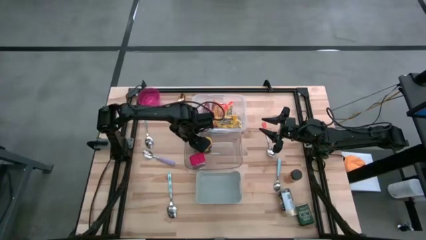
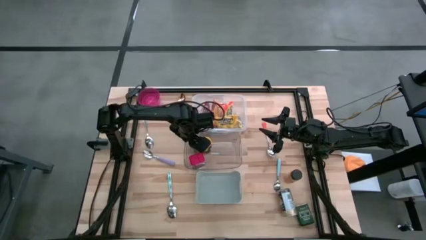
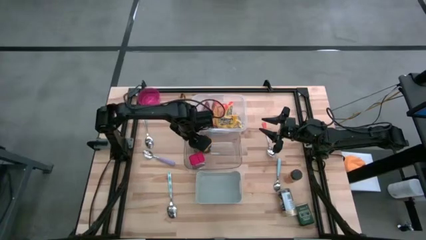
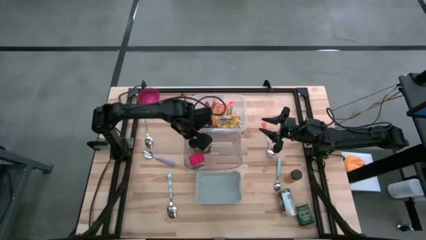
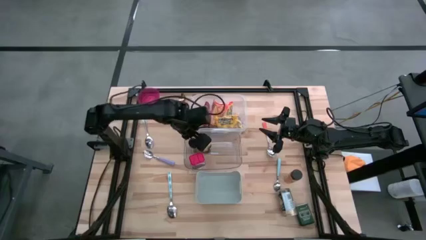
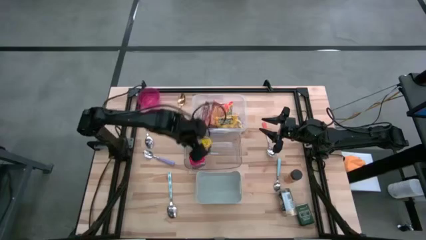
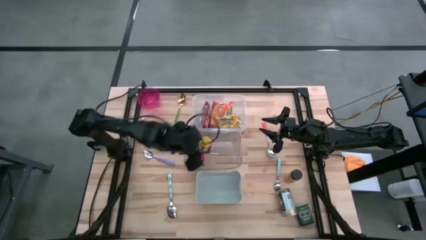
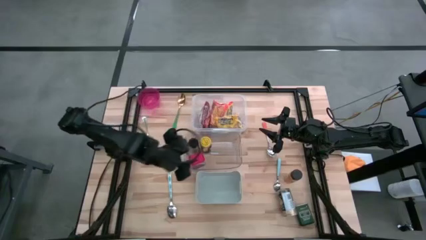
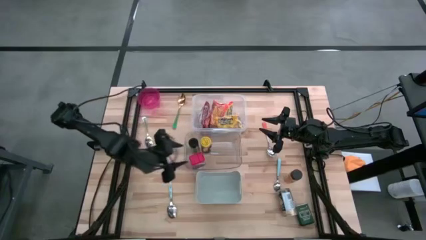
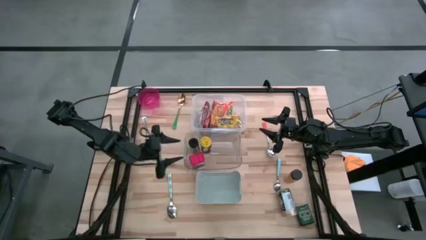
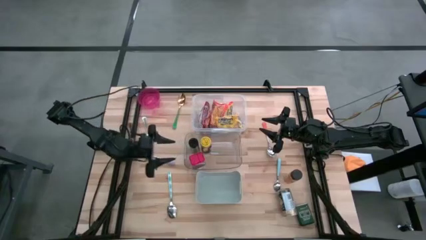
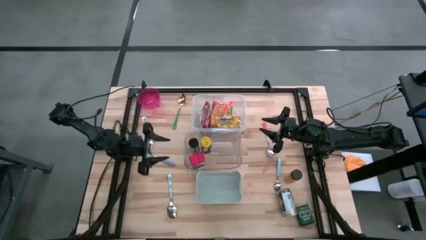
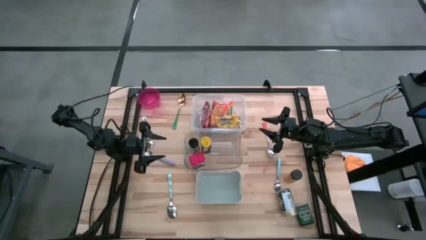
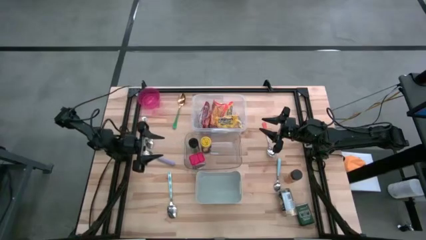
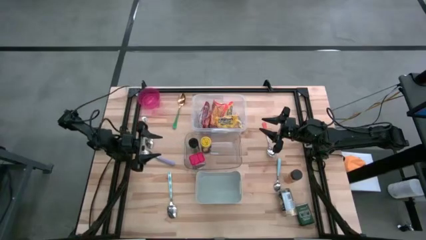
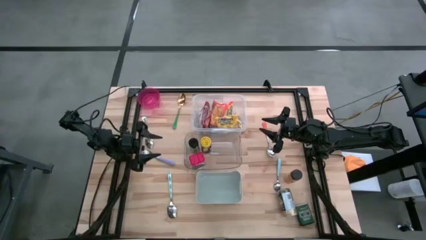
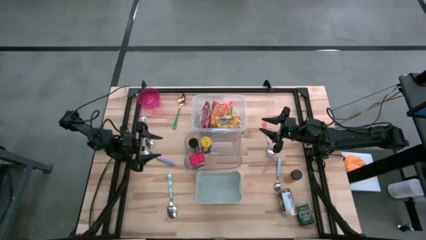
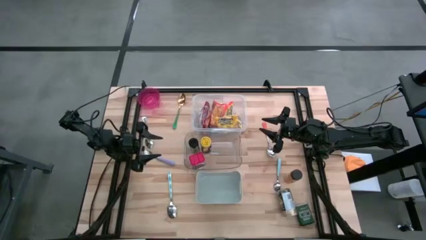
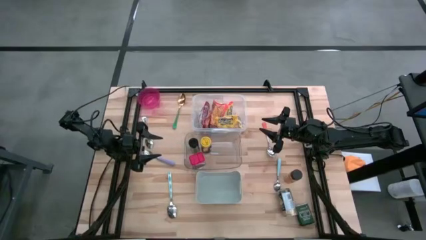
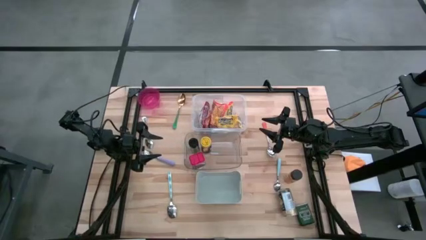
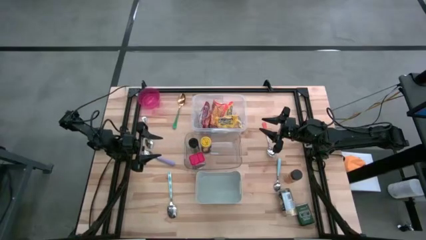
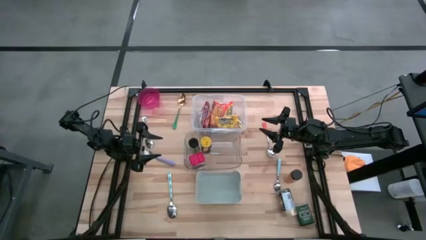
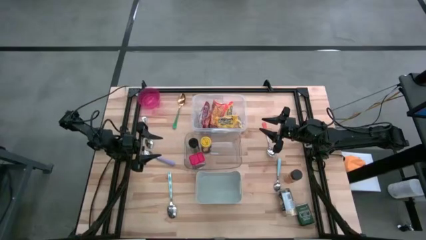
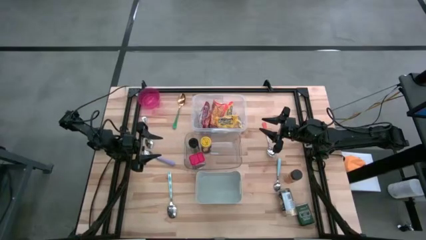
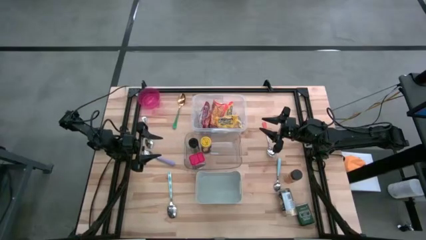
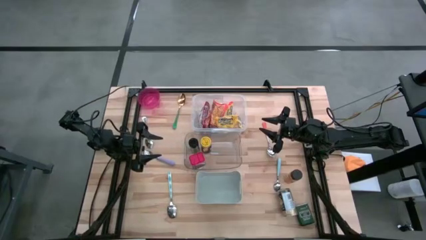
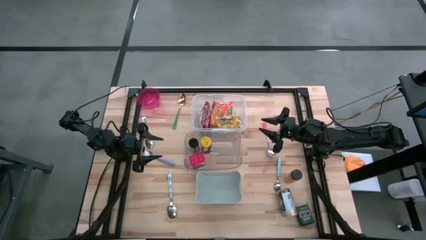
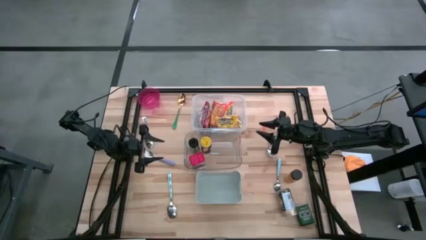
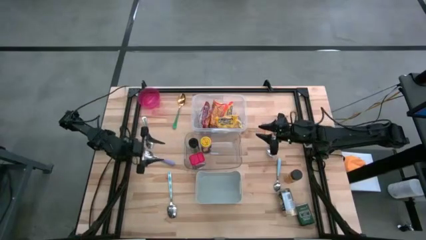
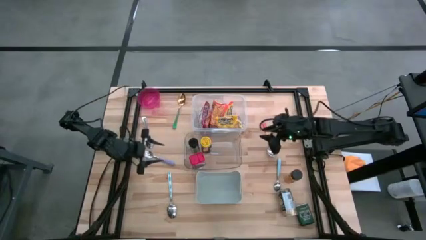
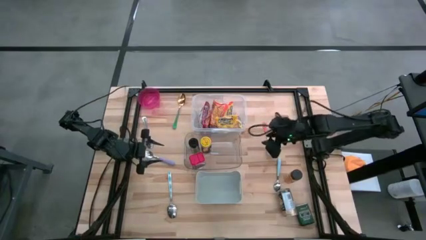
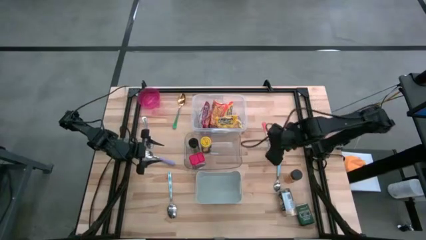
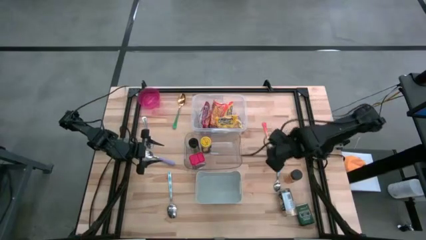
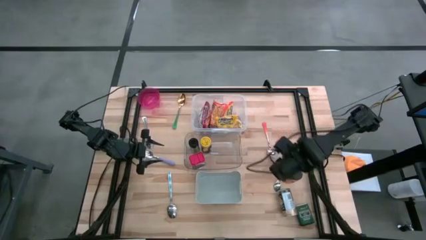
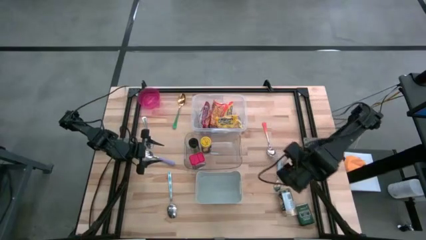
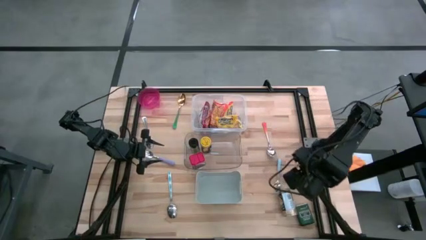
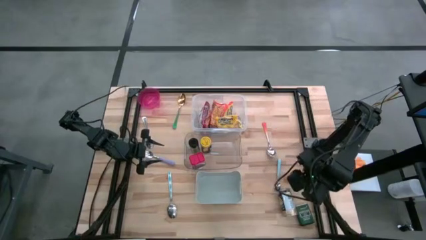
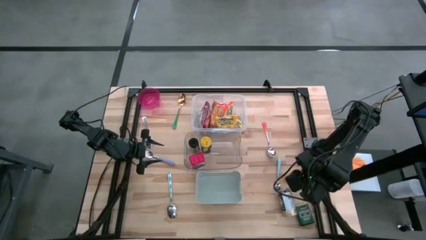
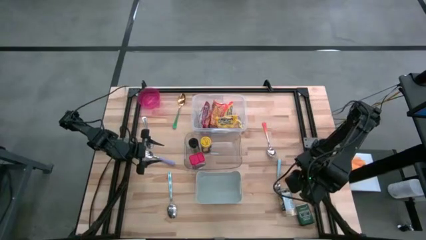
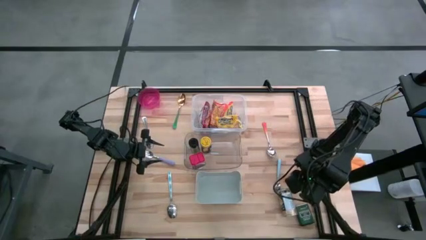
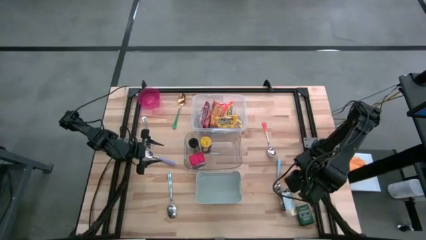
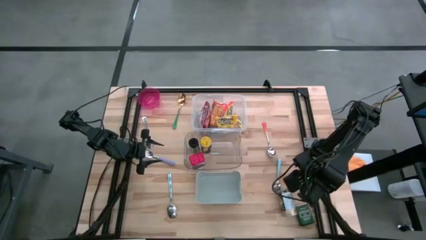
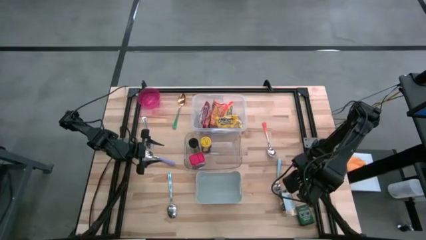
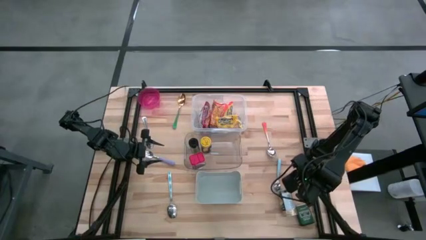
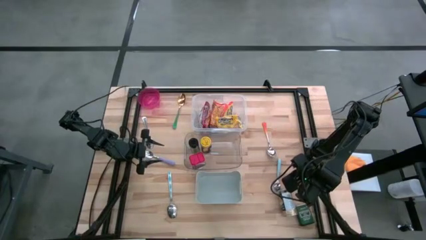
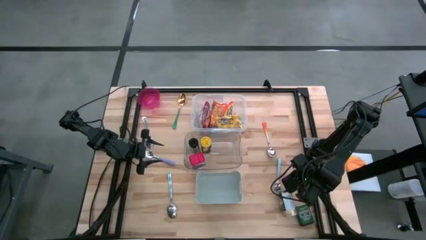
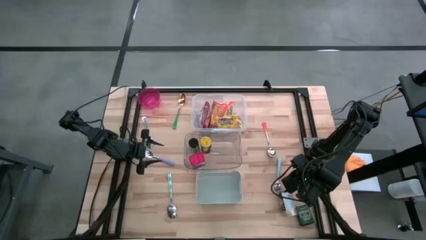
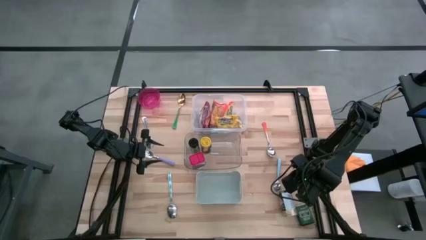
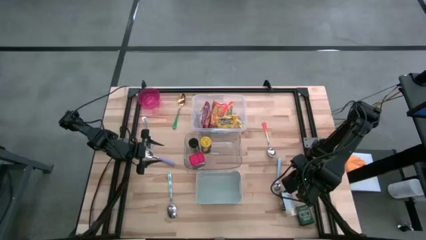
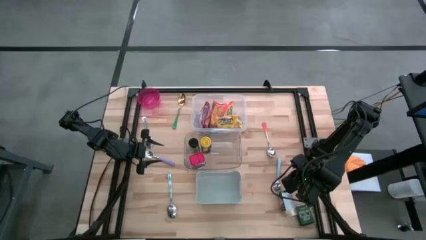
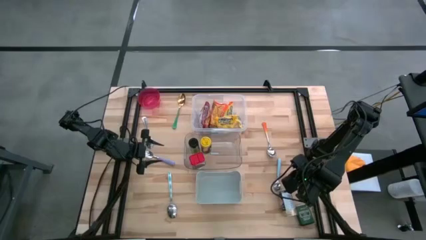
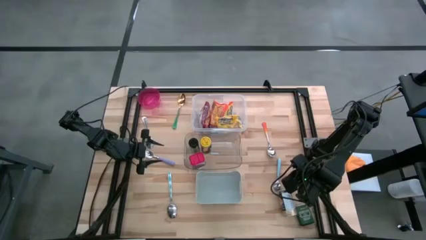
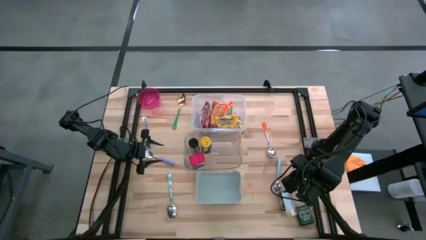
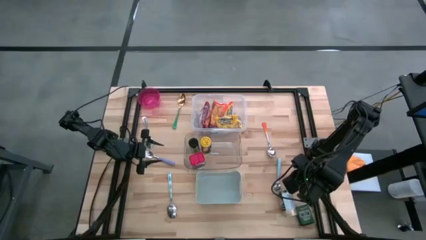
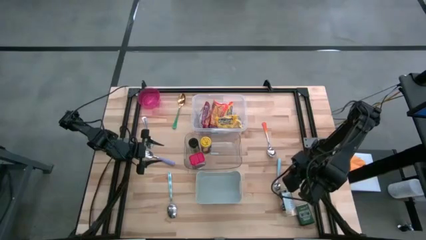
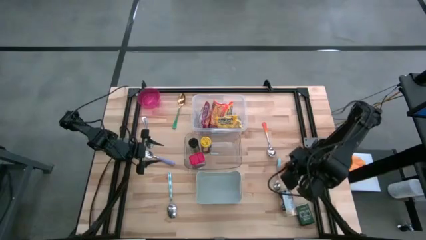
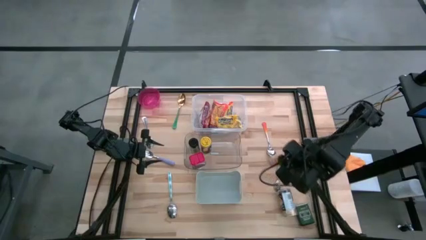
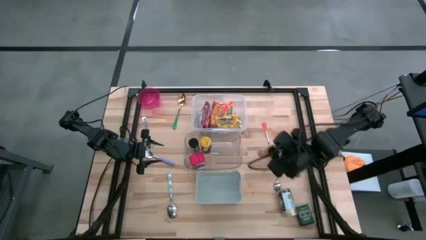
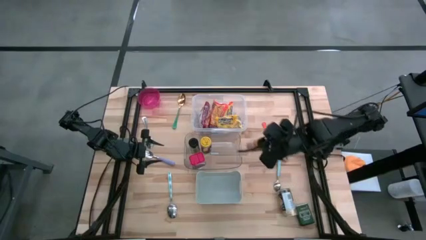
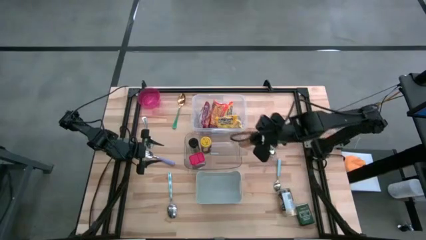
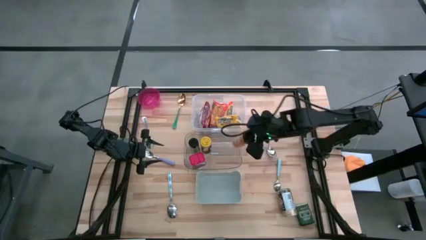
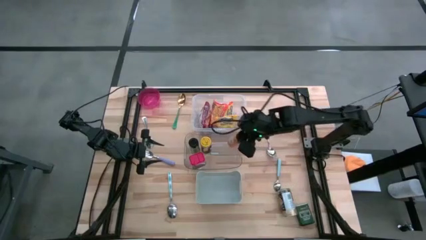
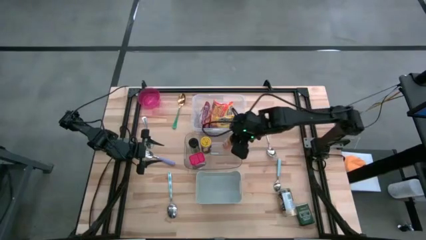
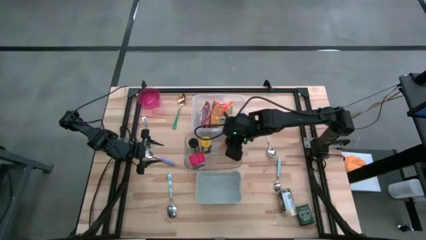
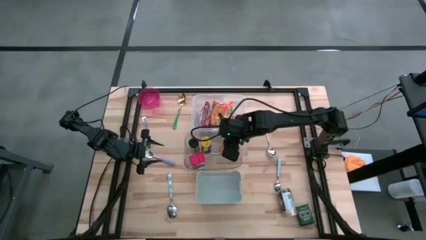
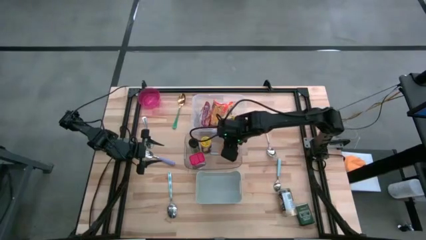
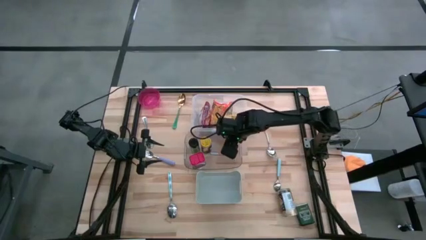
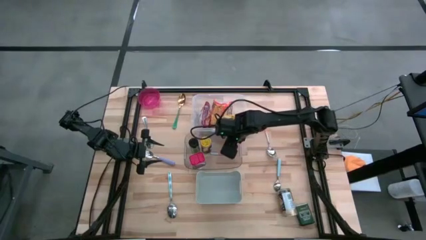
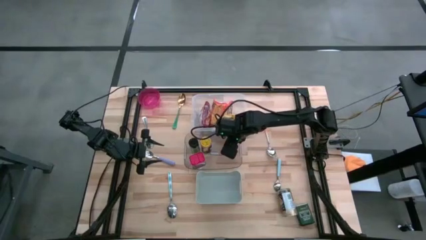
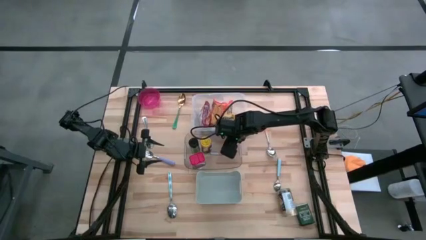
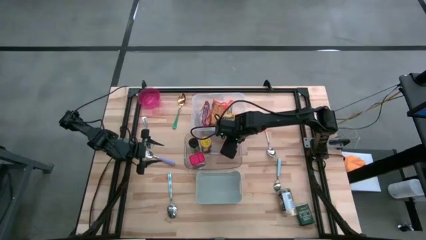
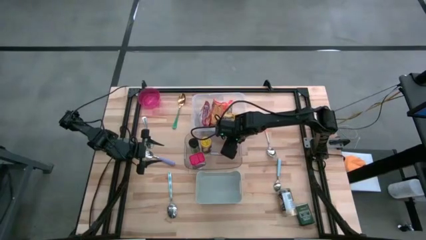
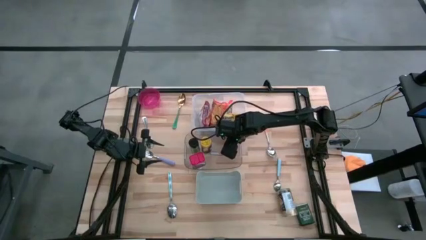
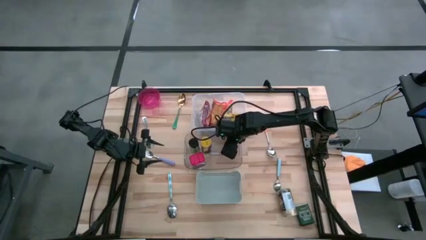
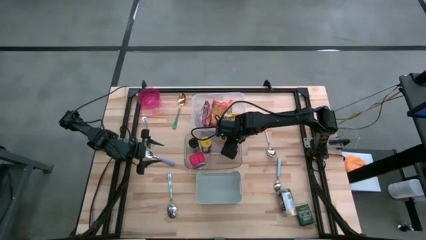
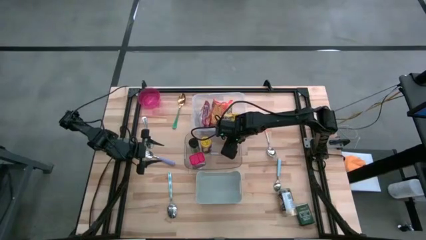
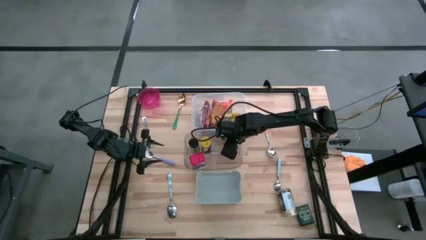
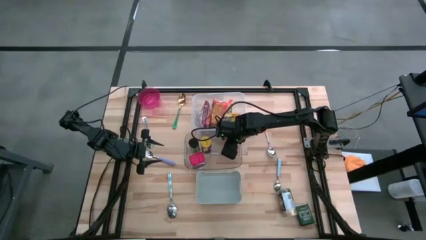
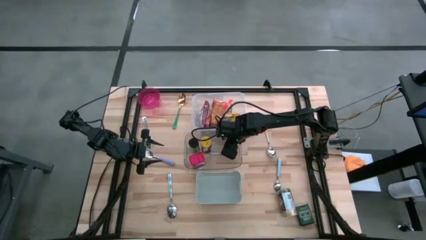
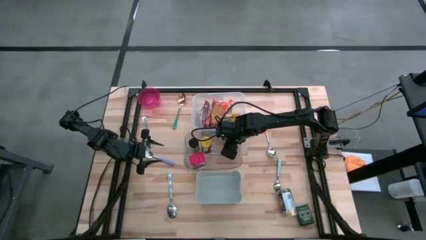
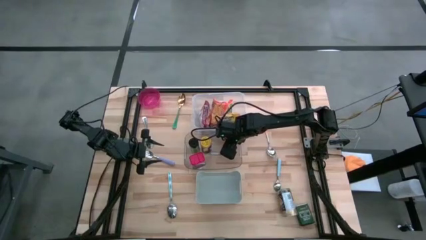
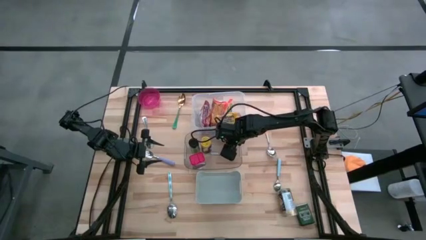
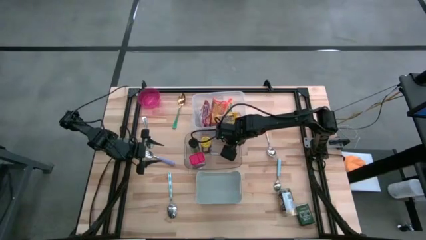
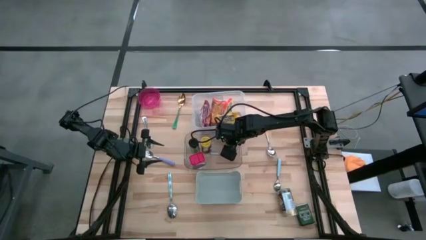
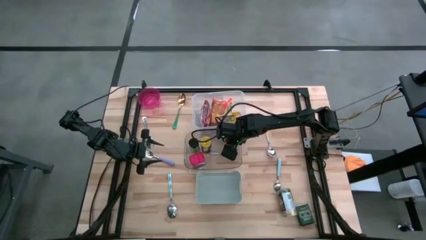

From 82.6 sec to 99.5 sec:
Put the orange spice bottle into the transparent bin
